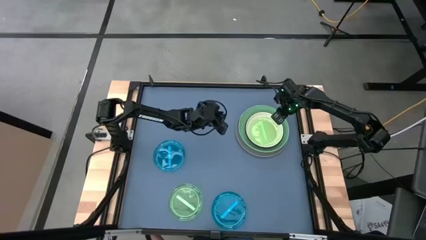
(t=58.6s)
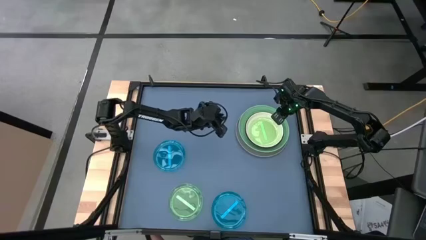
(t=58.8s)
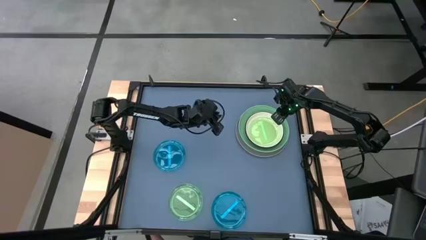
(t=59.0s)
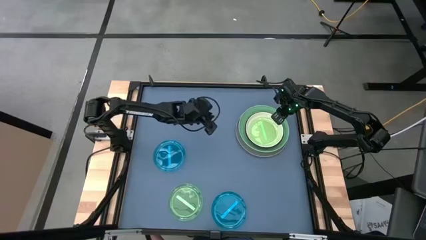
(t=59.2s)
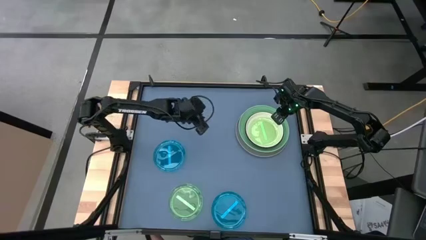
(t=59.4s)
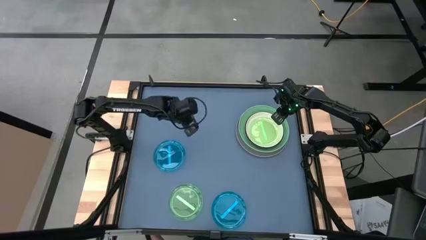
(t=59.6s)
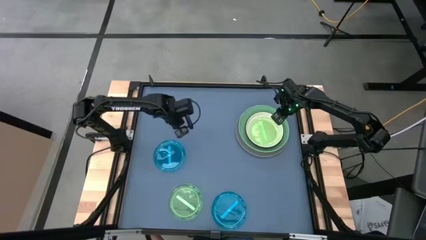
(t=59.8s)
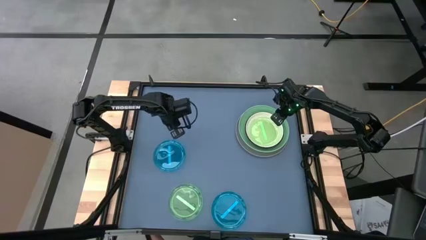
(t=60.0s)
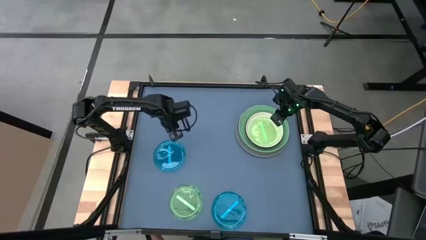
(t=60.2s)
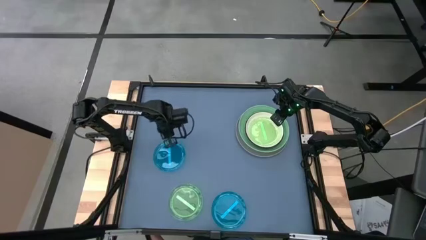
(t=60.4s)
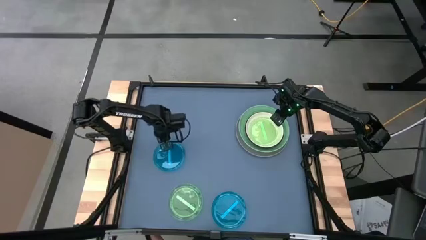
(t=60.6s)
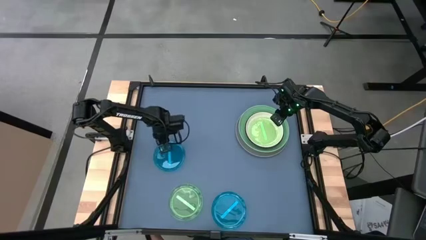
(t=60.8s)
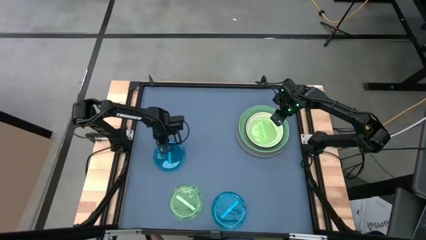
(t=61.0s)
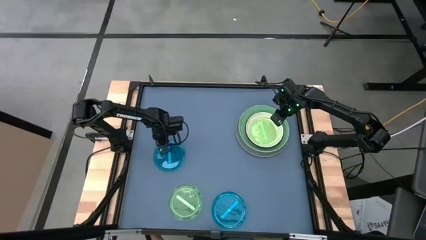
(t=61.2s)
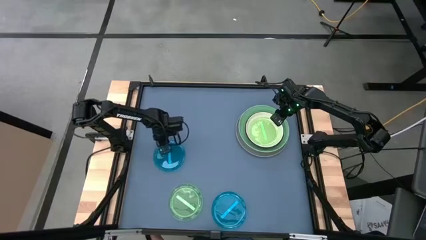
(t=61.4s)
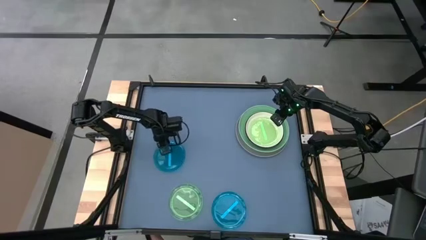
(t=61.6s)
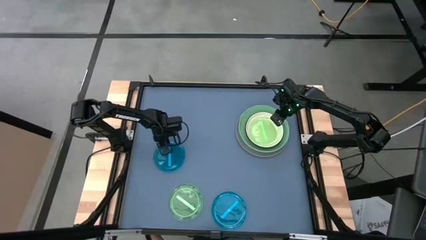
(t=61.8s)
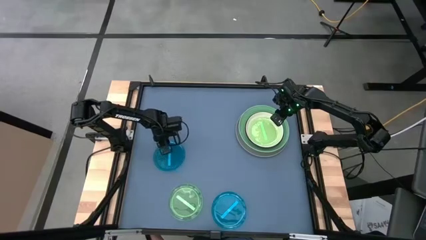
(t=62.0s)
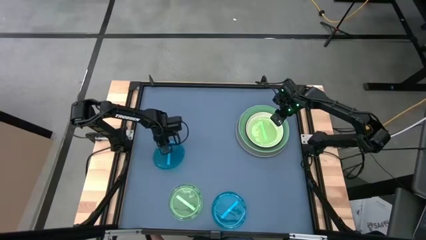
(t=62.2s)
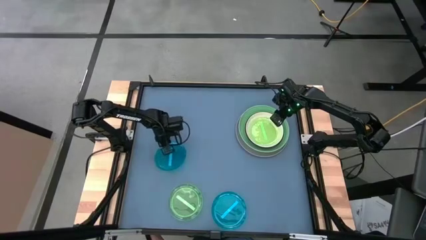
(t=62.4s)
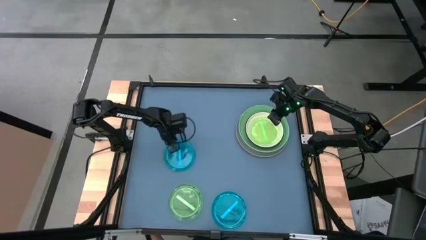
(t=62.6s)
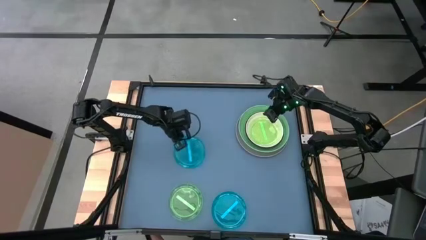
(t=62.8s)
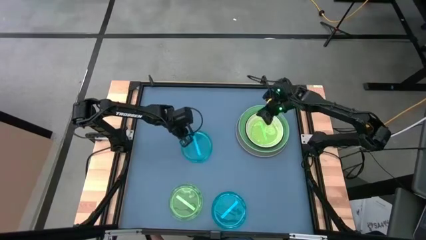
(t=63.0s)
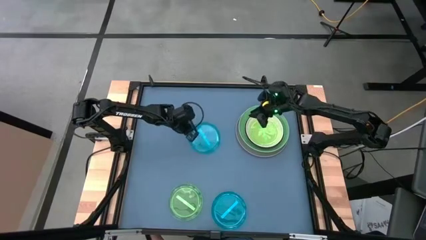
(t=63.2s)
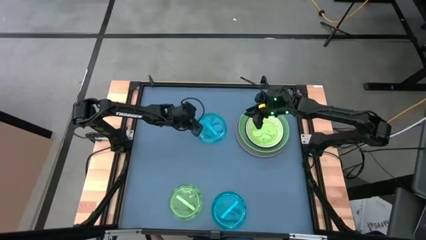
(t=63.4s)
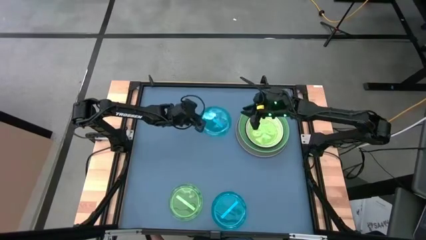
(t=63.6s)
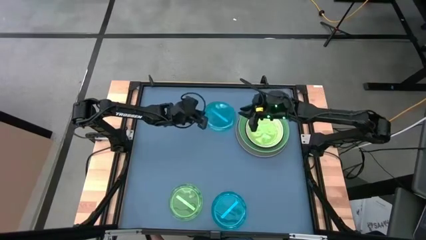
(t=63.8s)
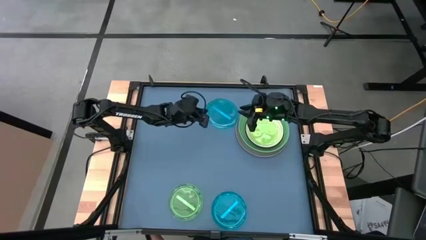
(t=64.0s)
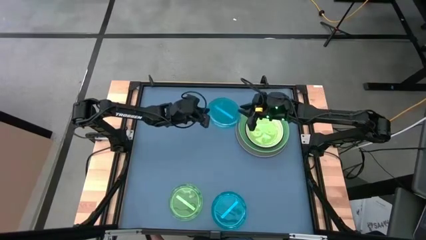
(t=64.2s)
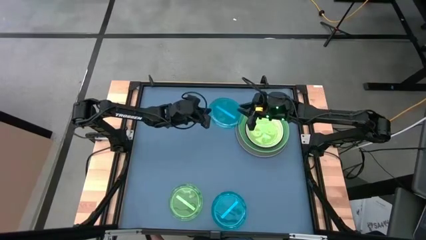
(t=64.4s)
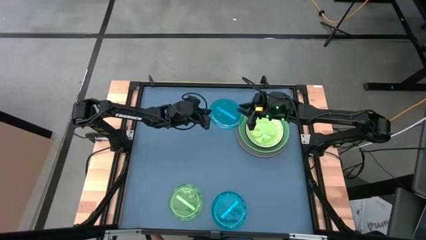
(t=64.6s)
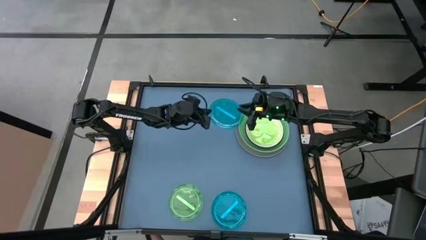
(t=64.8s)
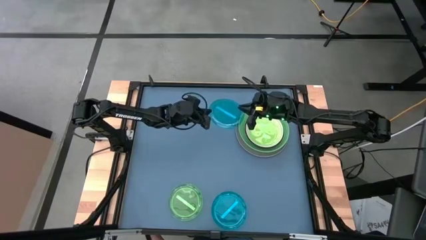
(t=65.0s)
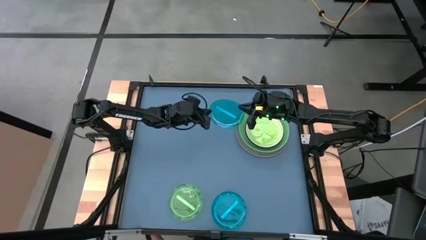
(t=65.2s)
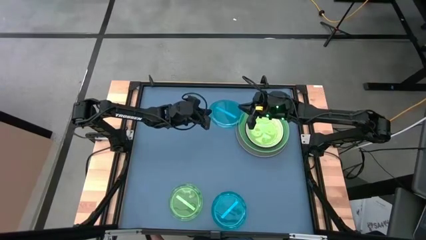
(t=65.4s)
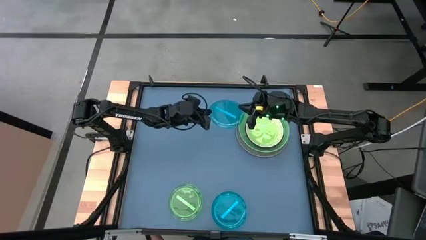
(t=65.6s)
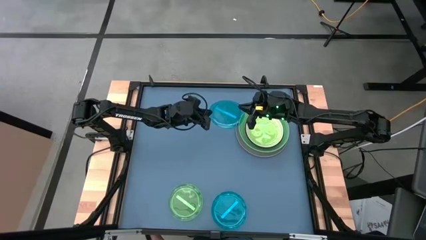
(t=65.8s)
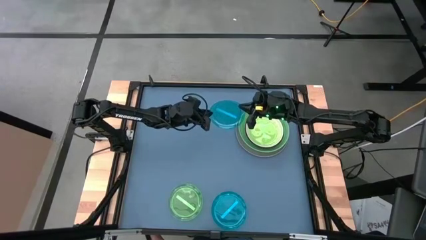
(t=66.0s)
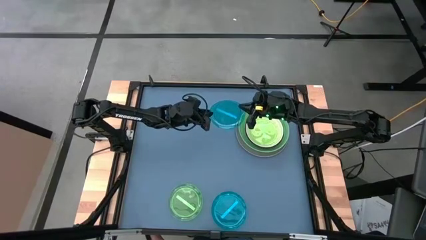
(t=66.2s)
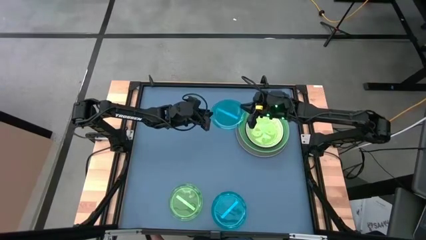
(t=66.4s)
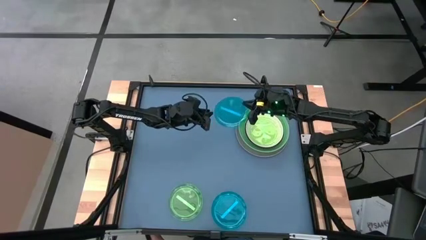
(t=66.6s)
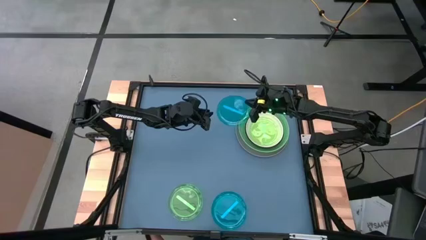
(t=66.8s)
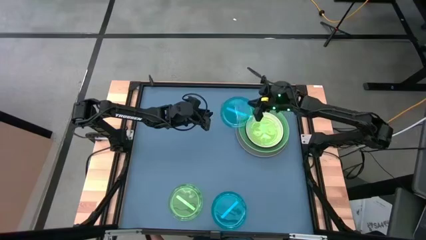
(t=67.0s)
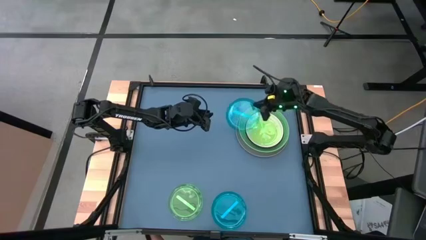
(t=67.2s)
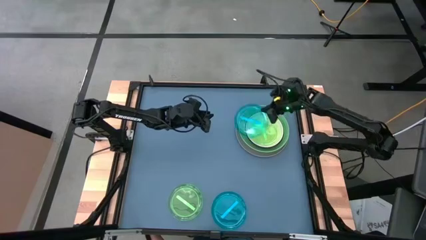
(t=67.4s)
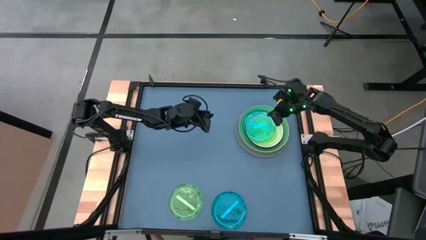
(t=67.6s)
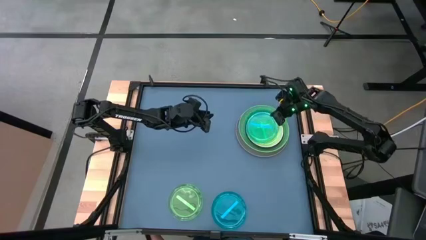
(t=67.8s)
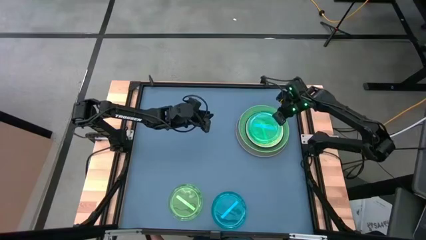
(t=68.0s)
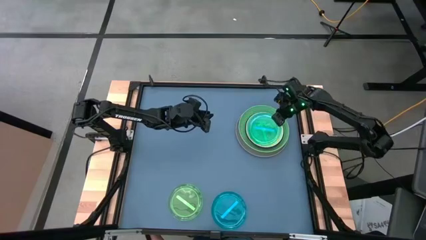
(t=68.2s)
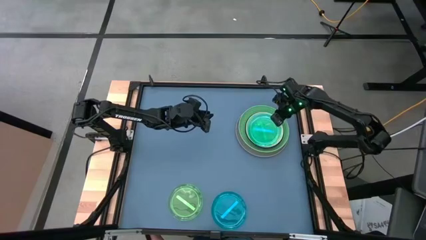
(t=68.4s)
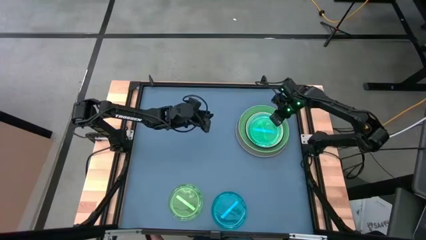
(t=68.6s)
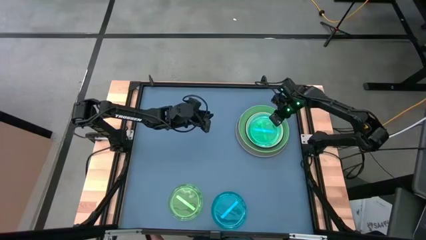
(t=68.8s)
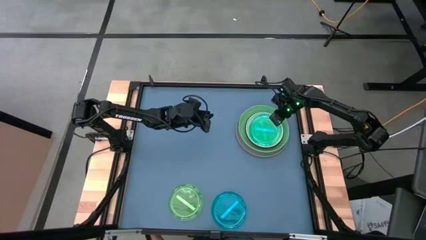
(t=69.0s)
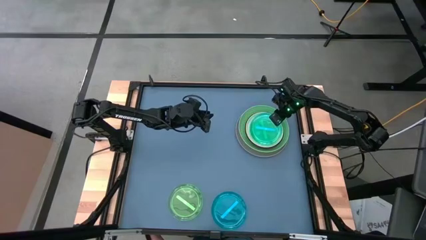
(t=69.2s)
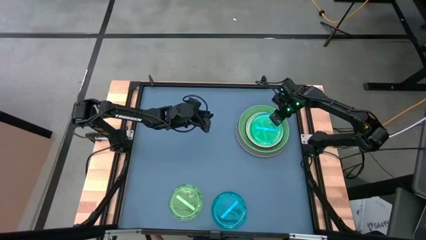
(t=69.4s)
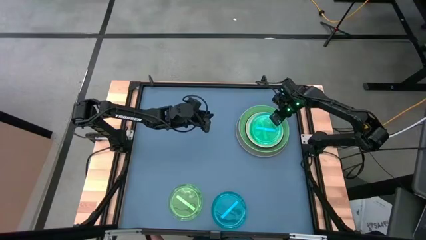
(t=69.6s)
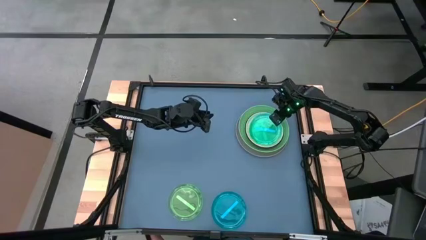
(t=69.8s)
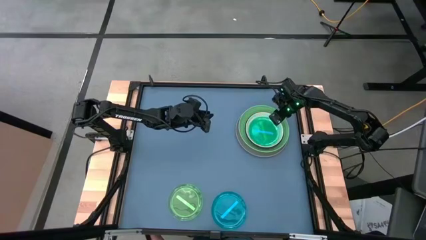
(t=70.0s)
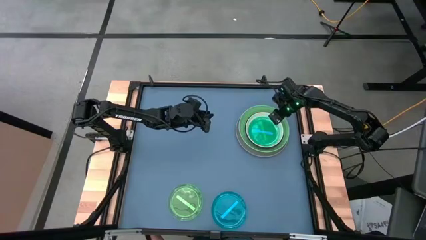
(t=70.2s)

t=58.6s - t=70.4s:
Task: Stack plastic plates
Stack the top small light blue plate on the small light green plate
